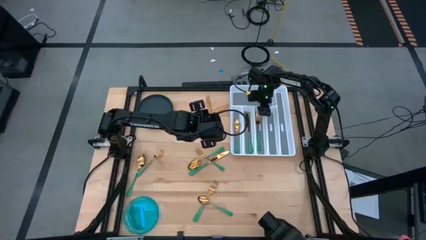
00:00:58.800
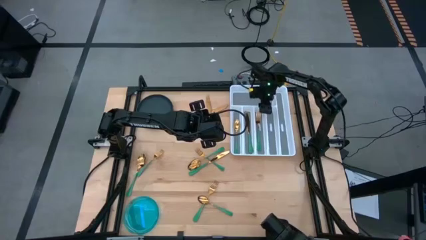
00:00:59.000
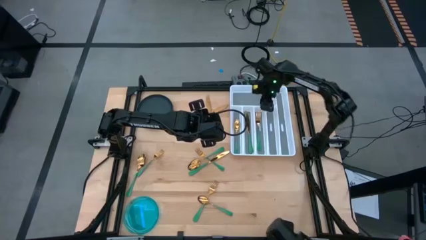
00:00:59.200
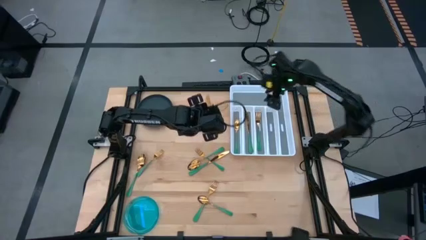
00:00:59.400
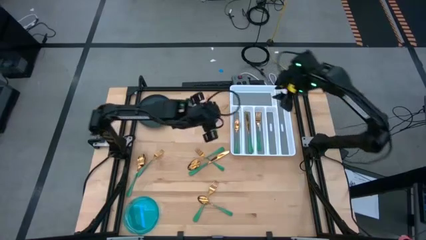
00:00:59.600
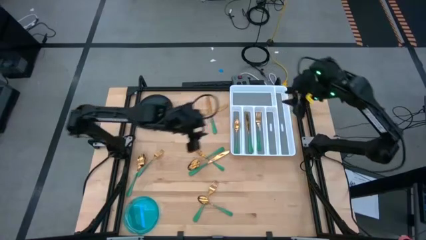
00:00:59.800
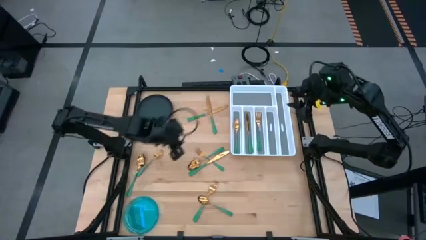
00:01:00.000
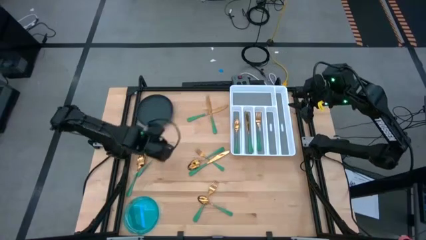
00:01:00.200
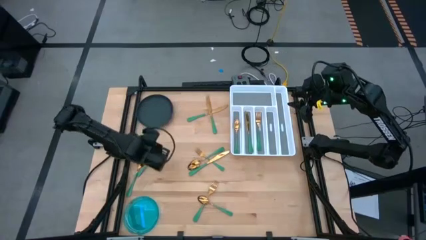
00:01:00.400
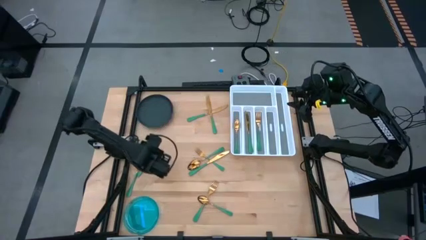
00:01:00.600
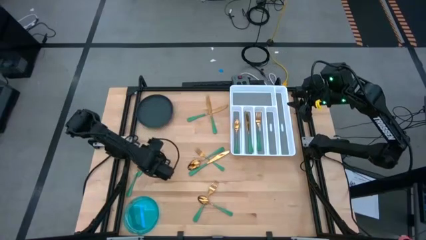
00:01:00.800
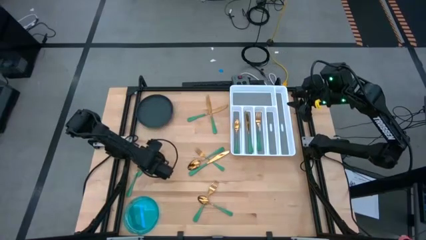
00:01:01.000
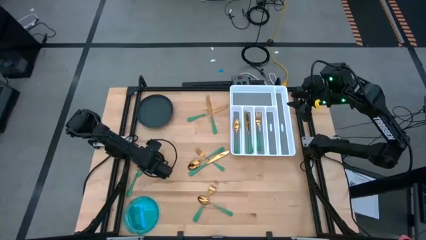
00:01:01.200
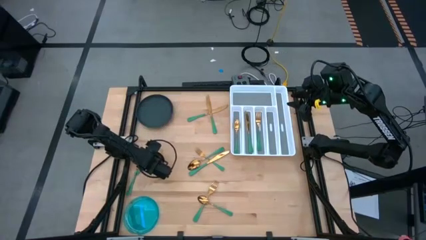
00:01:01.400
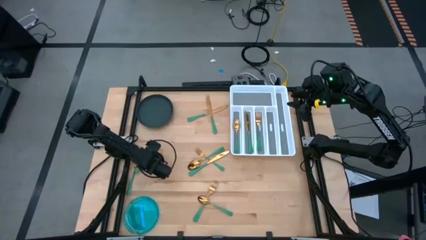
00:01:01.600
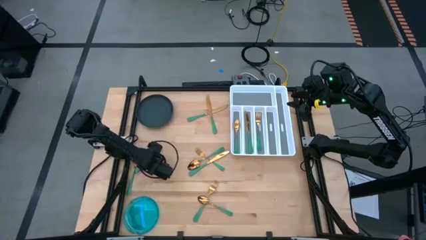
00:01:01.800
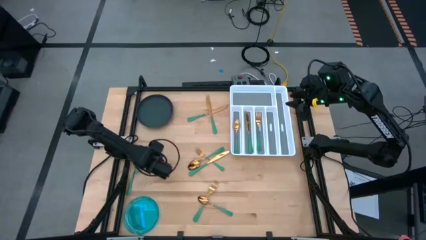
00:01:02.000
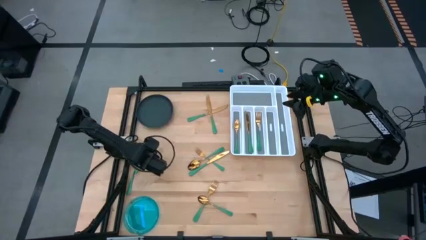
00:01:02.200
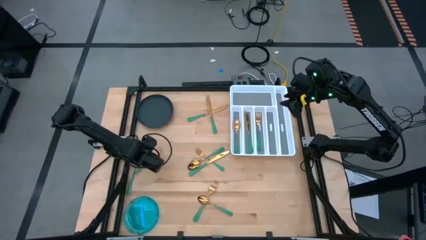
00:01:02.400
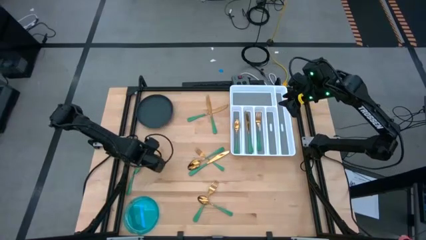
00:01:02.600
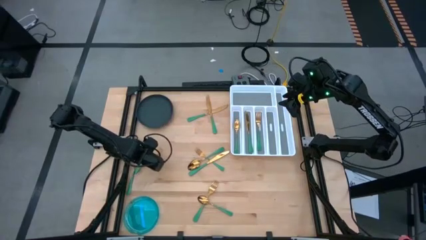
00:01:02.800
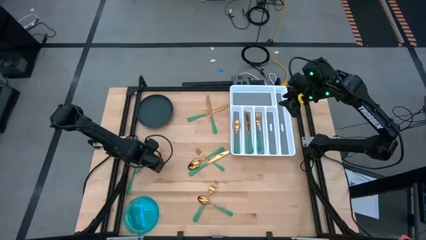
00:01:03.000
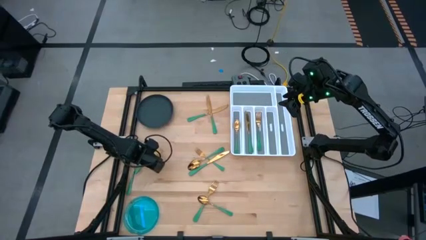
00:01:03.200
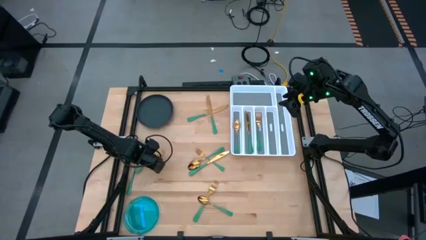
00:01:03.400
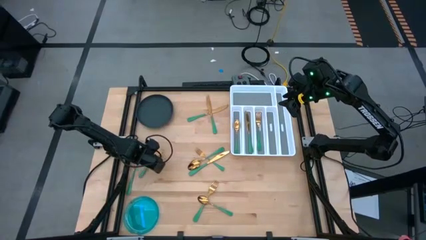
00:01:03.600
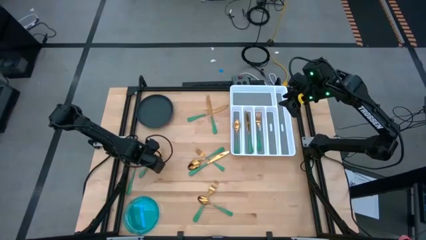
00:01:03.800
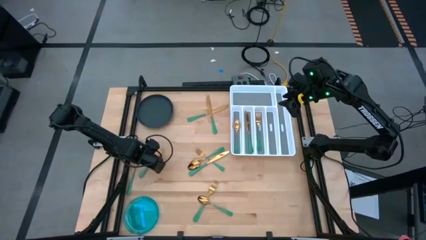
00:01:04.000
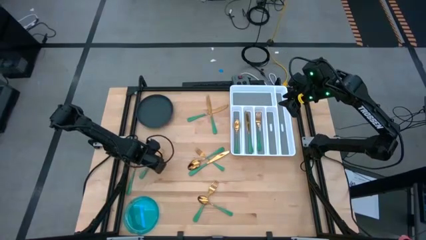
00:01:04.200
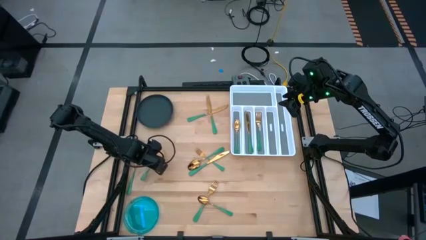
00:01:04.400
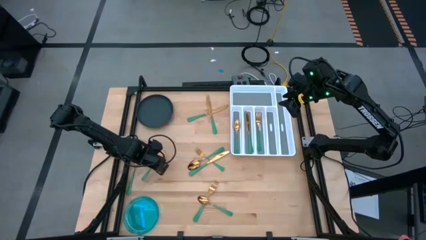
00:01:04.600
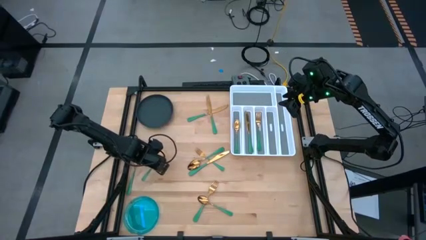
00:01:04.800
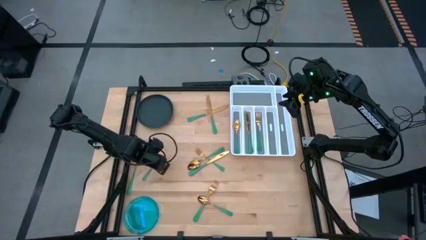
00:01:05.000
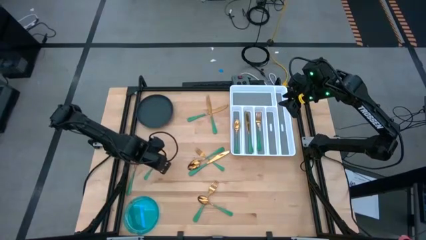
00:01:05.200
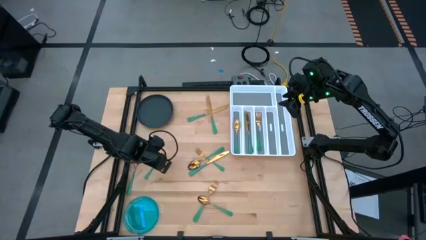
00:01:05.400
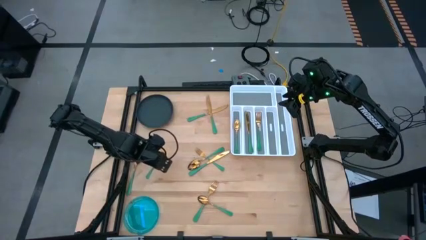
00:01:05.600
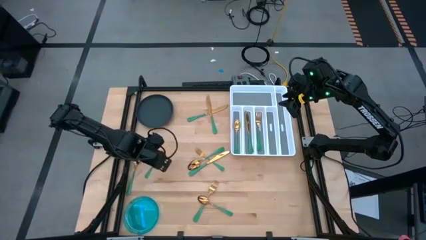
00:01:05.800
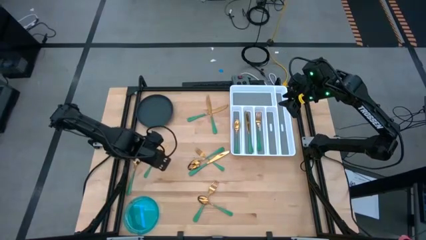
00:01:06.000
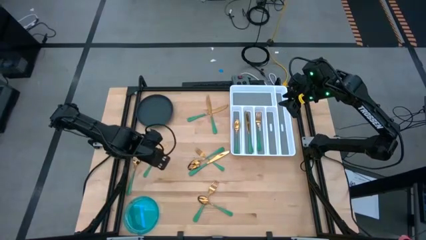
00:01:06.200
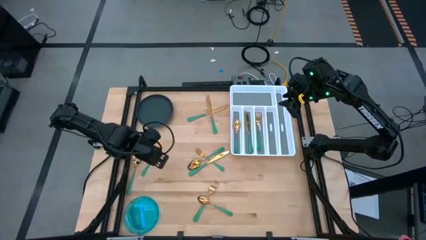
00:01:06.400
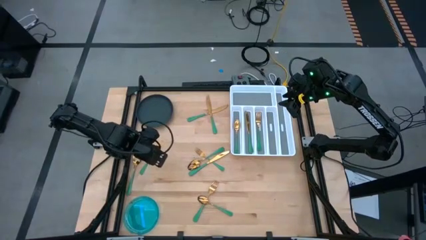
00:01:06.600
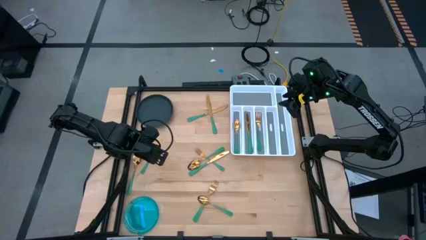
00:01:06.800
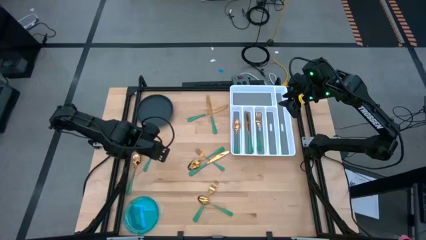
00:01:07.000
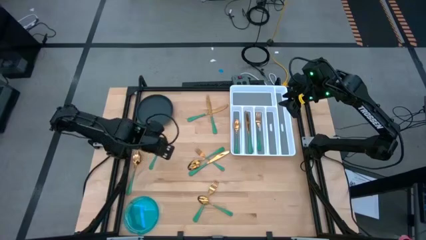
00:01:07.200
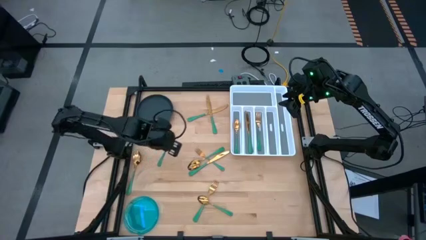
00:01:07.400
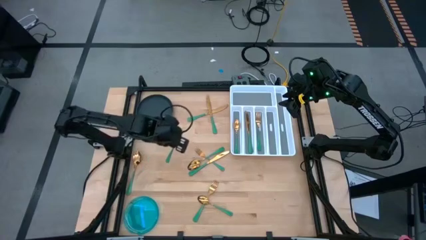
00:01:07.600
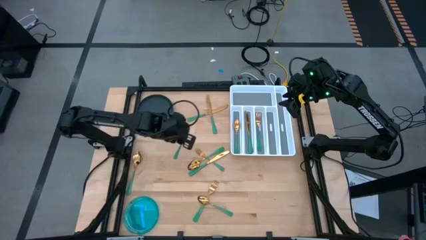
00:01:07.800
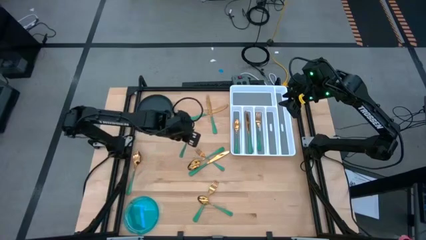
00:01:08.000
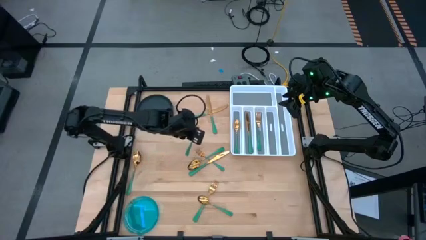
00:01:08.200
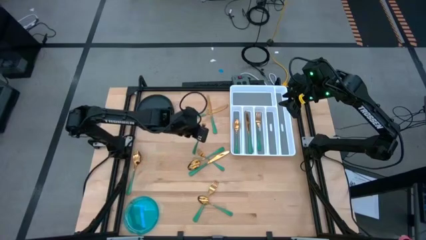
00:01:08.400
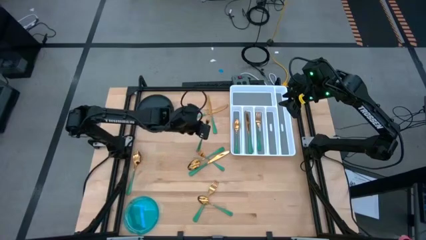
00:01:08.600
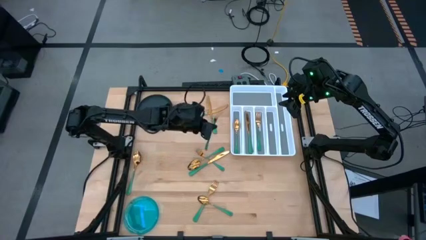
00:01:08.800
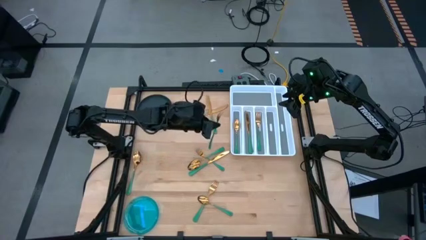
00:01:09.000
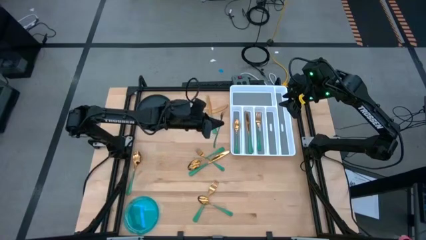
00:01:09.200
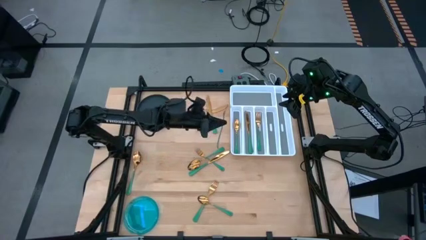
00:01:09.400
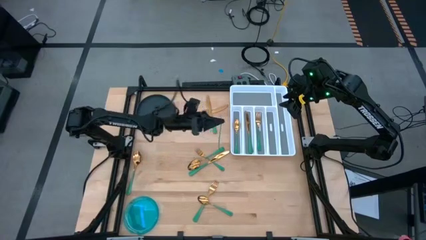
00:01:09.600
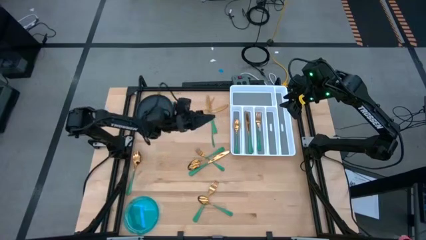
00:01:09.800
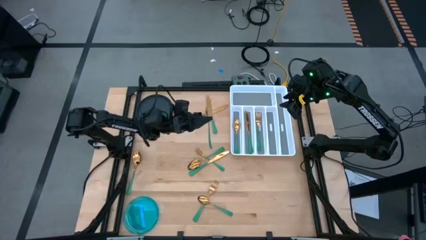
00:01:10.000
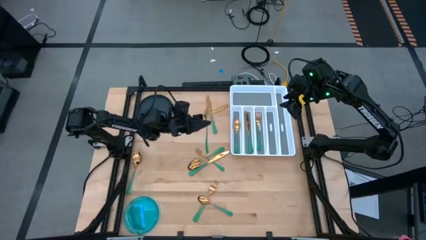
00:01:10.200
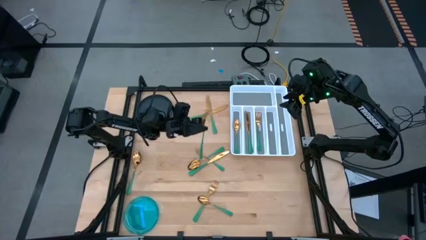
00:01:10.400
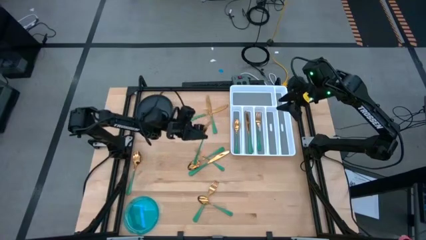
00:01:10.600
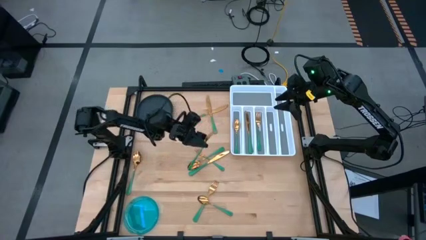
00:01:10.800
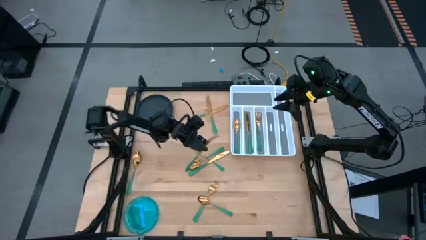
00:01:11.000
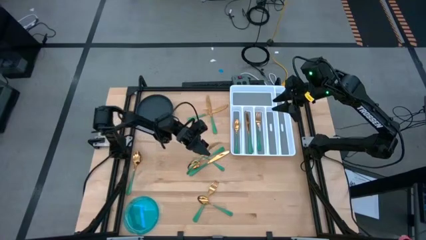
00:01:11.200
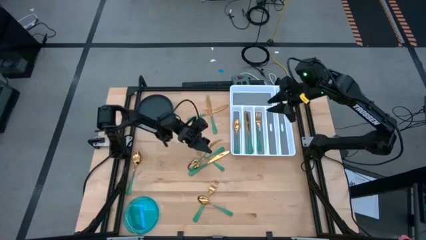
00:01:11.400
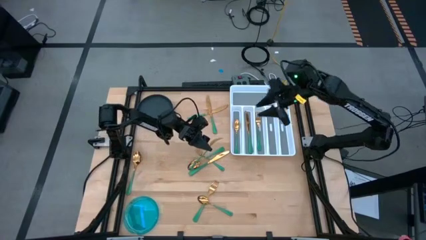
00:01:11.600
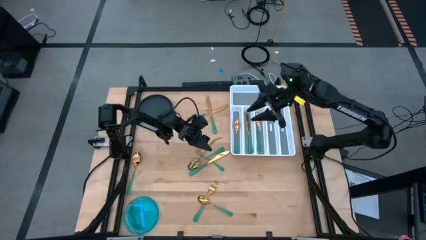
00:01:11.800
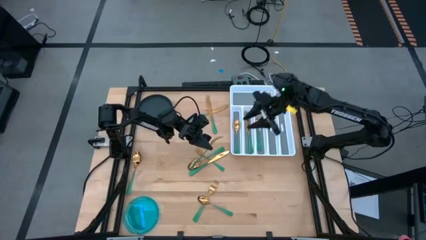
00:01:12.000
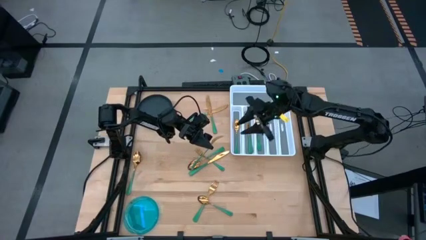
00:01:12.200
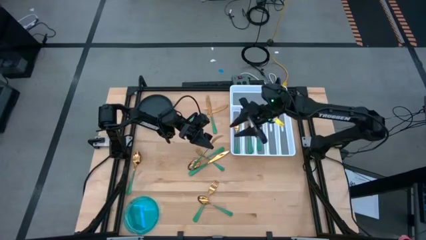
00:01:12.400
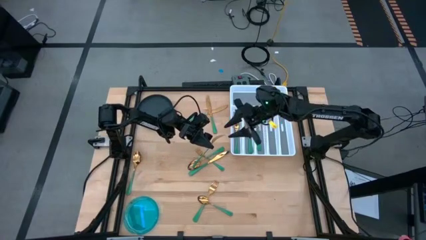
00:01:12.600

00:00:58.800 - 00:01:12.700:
Task: Sort silverware
Put the green fork on the silverware organizer

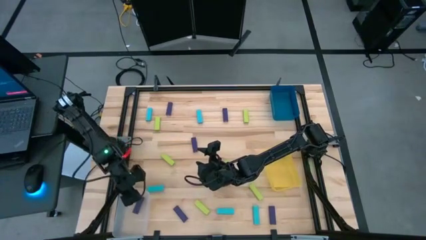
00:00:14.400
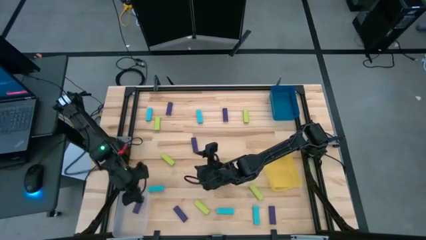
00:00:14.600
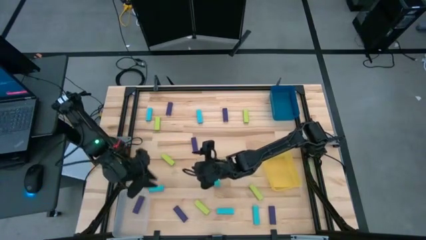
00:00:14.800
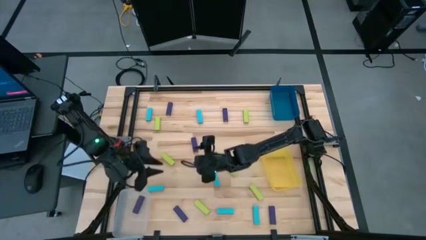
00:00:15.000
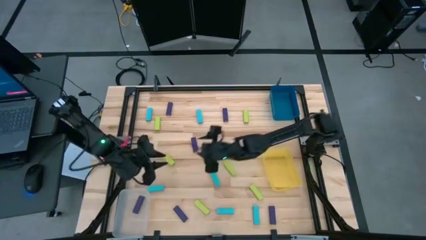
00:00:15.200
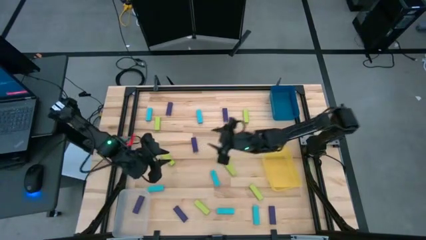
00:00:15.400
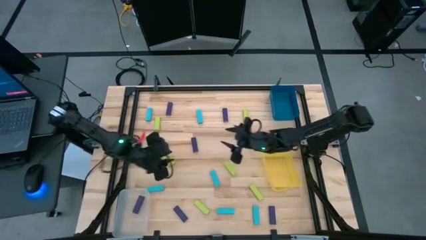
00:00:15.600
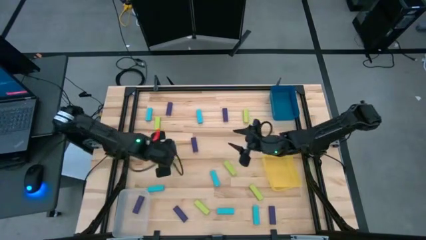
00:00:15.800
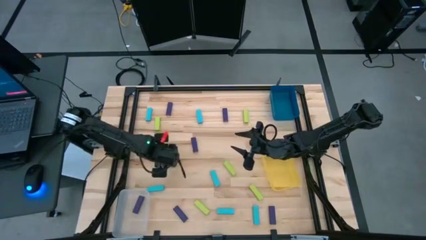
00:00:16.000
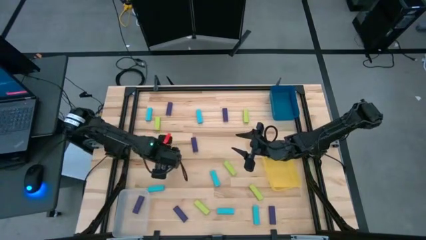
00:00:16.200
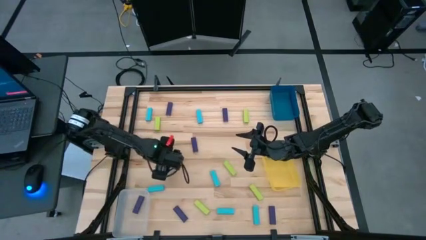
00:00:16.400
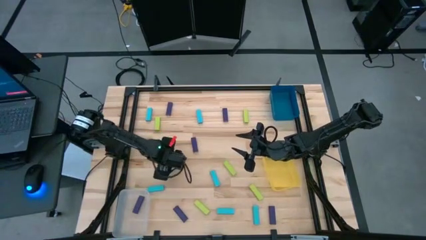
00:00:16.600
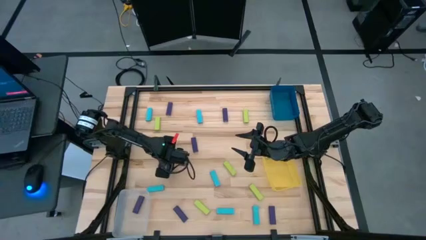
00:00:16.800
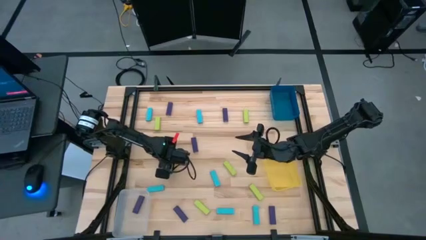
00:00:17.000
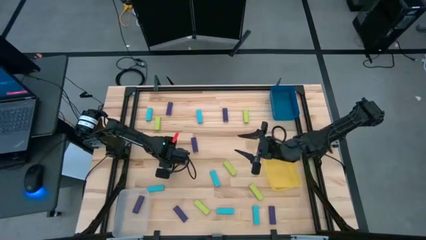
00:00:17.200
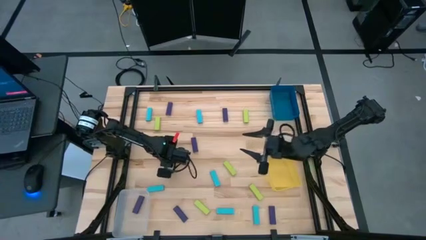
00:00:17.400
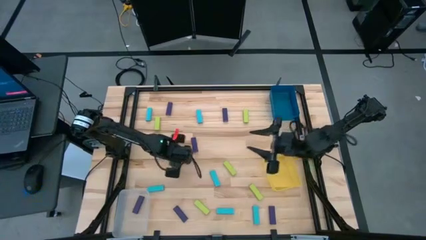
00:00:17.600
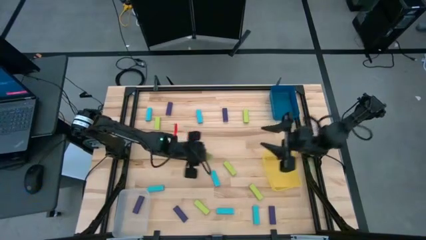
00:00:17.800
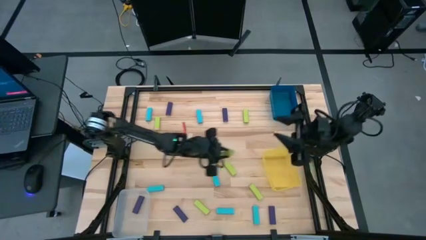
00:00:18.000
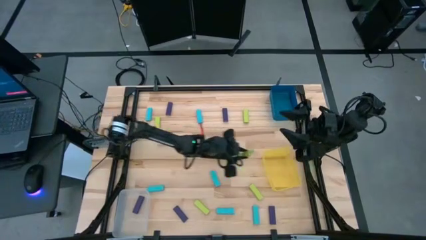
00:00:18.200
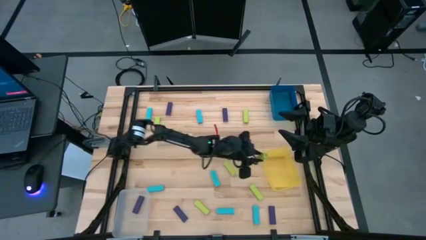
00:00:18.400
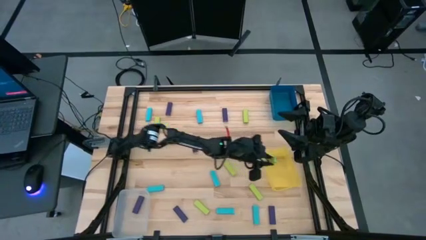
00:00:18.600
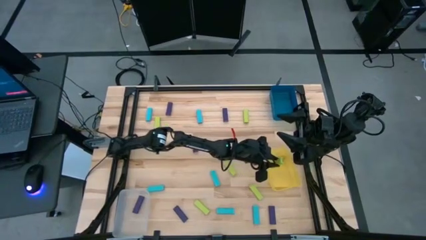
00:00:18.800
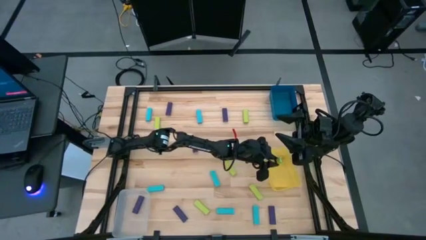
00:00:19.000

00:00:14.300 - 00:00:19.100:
Task: Sort blocks
Put the green block into the yellow bin
